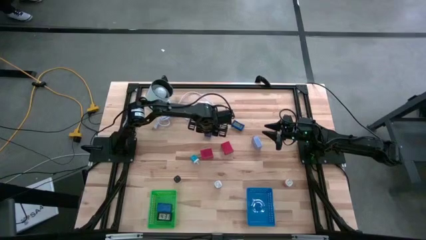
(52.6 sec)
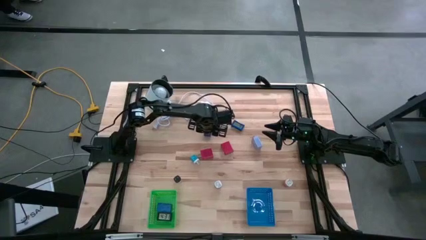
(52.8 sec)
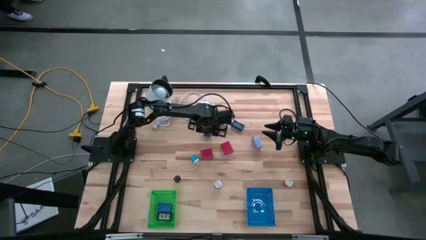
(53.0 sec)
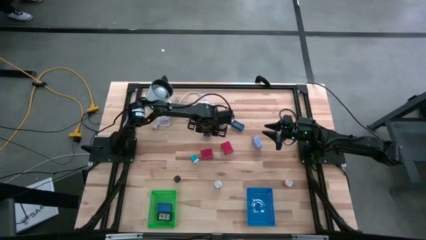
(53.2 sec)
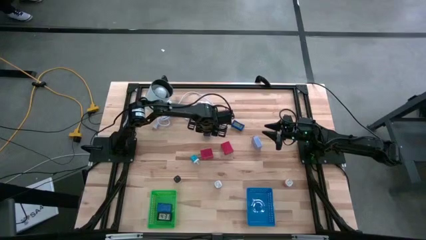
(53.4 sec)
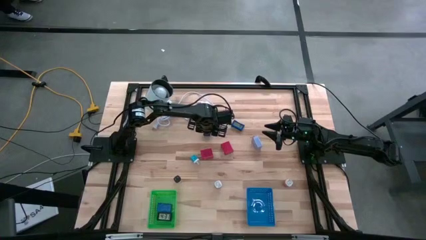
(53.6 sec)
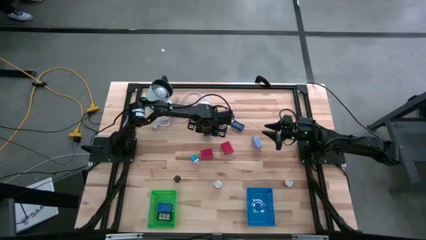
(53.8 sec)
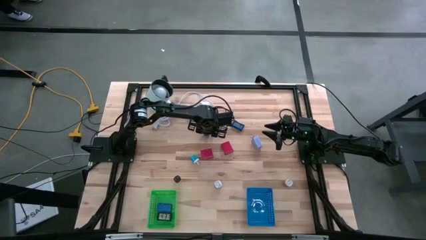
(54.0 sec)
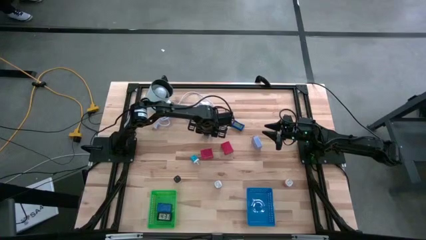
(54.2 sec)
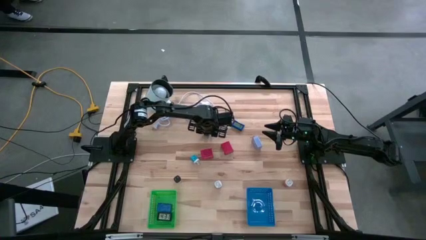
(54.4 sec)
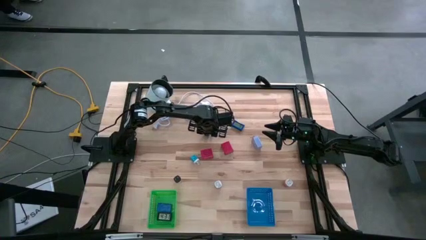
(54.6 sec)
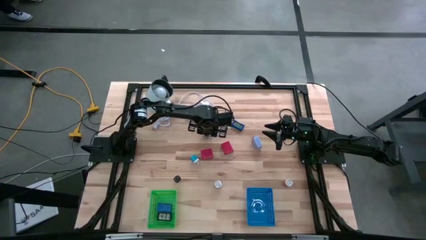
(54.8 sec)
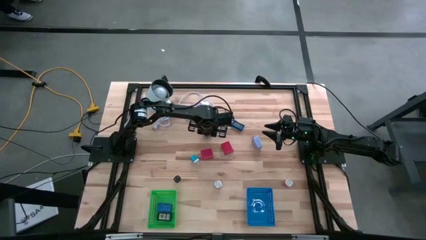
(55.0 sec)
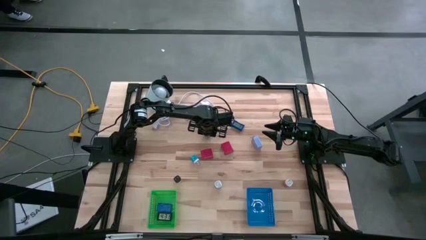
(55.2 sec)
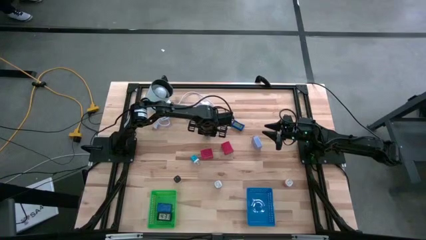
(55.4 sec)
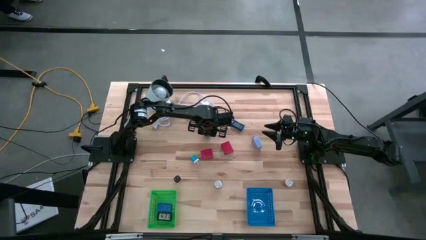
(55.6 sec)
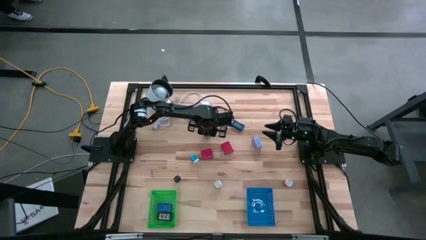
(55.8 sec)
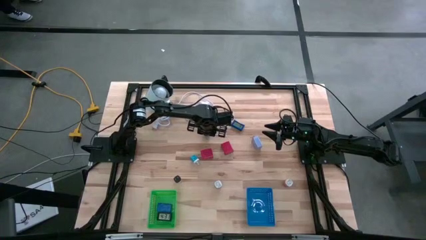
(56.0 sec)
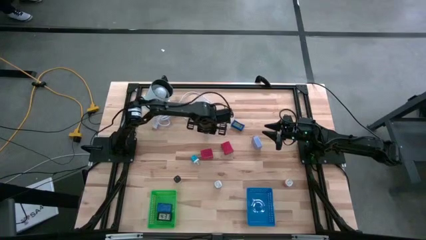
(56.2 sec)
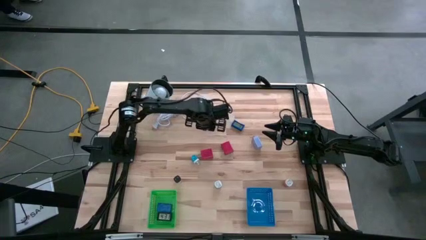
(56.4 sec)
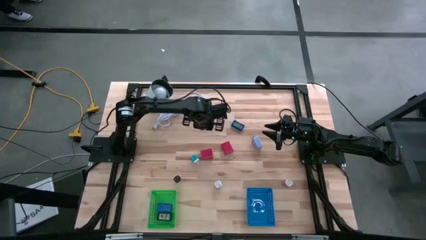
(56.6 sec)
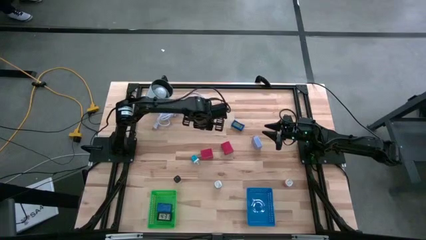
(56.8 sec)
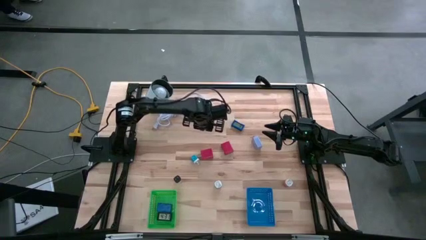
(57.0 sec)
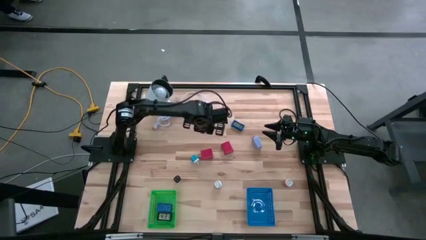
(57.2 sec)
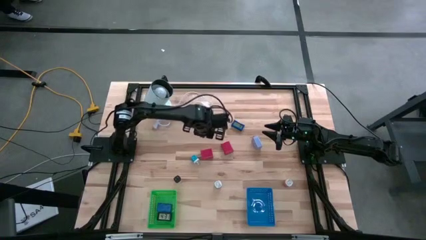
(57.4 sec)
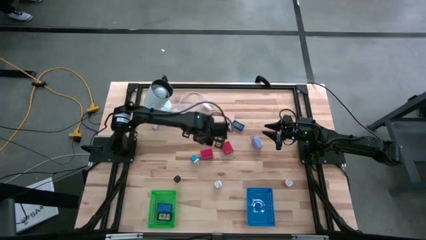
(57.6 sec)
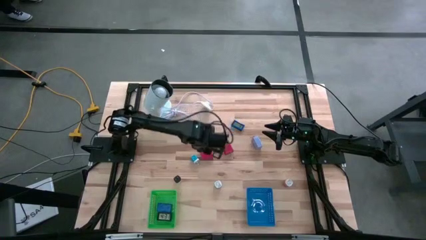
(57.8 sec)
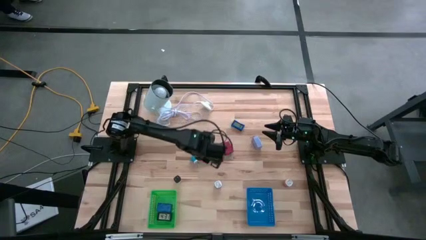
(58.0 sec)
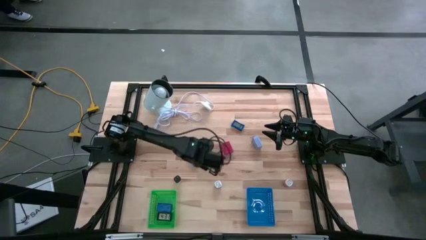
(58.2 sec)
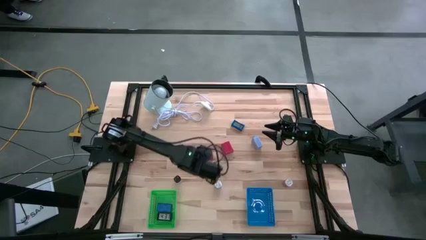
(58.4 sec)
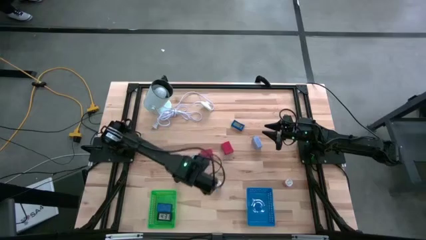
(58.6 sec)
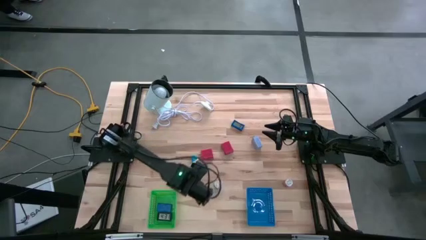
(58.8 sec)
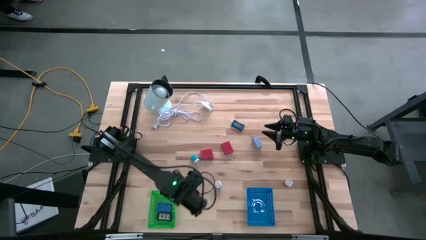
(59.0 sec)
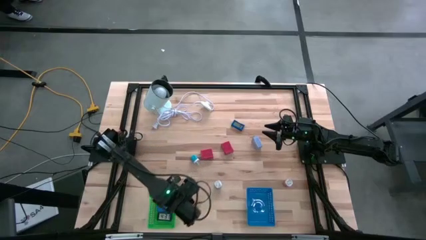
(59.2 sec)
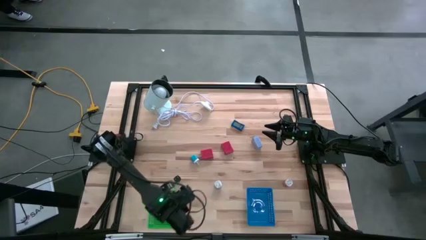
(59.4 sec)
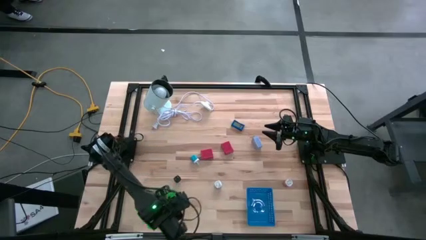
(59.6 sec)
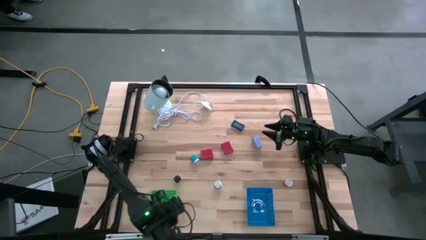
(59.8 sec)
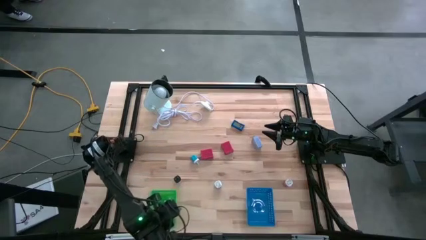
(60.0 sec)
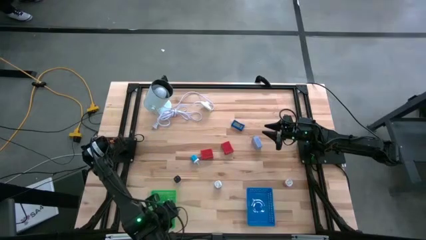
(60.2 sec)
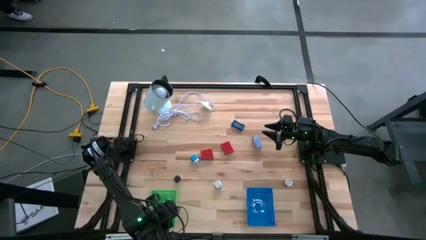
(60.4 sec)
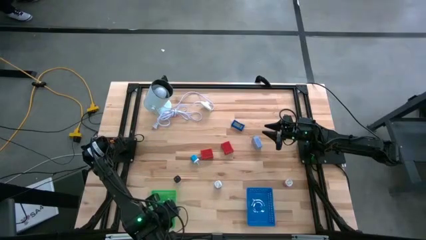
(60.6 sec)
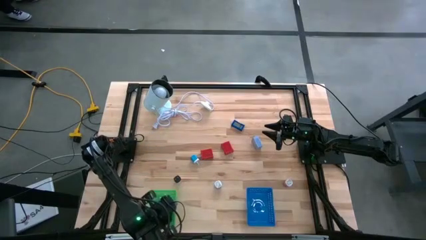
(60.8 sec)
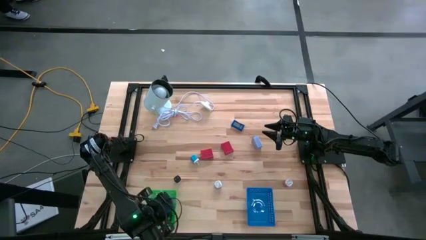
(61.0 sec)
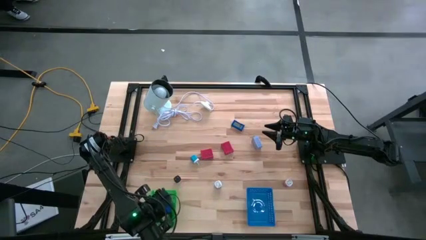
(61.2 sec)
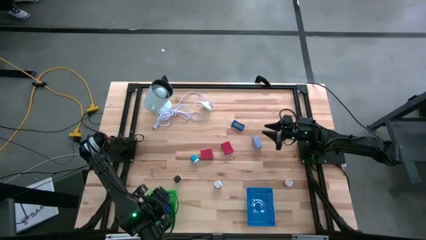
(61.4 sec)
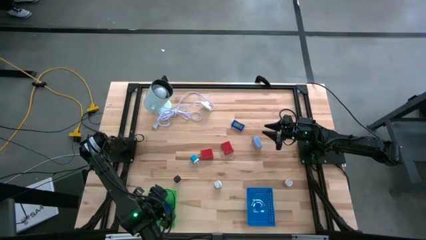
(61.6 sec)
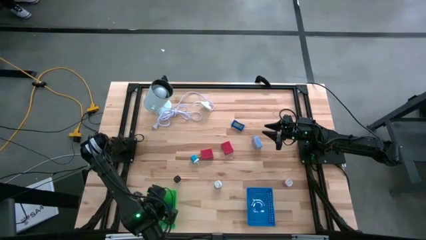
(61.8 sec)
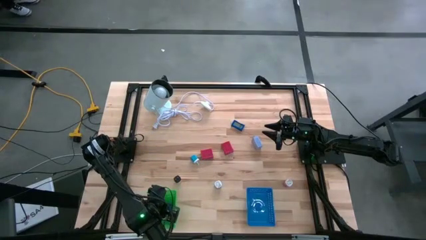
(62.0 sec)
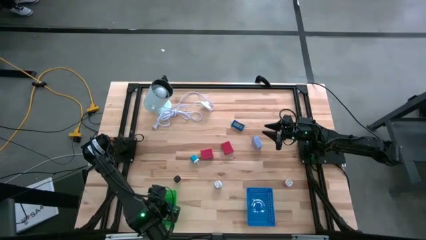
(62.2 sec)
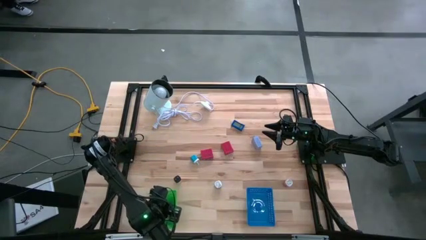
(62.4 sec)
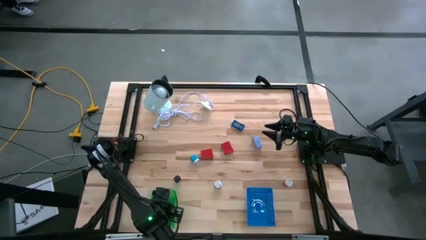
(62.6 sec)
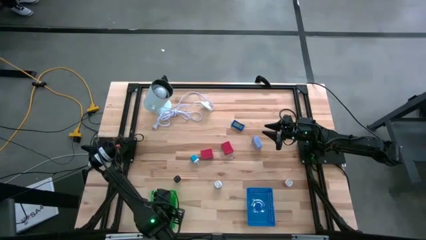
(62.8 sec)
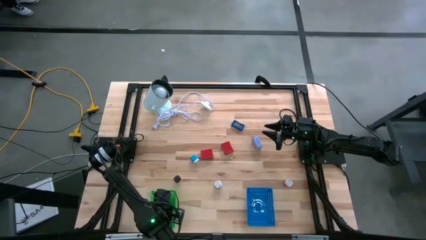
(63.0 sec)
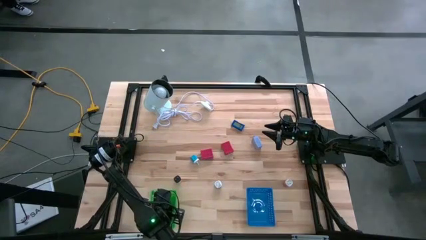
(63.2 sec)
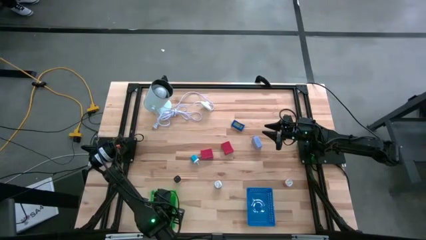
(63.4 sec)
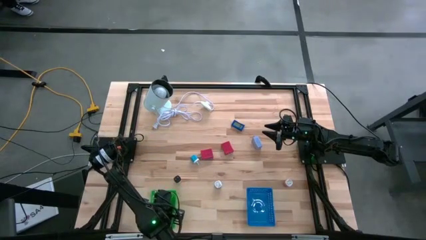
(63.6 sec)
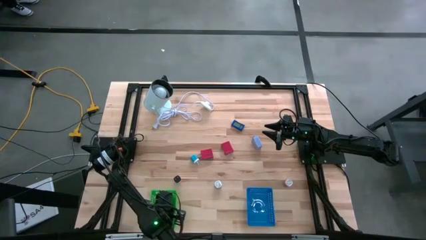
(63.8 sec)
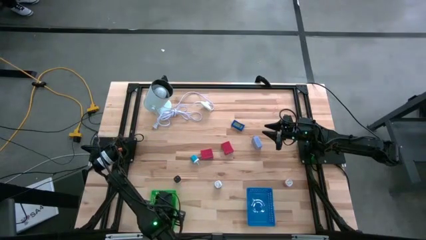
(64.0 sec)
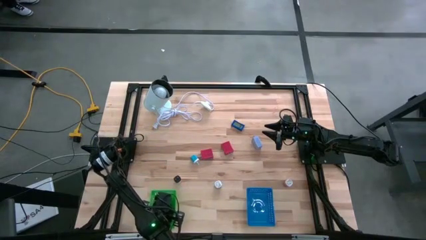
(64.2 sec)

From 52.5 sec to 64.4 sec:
Task: Pick & Place Office items
Put the left blue digital clock into the green bin

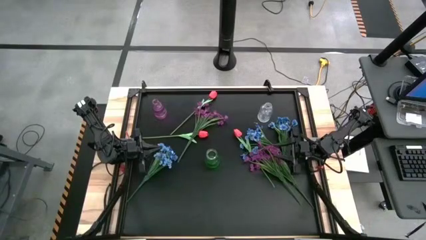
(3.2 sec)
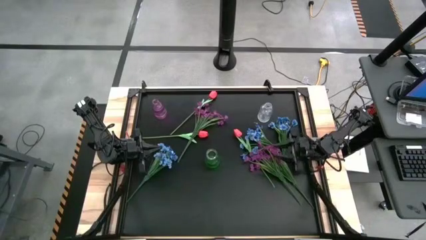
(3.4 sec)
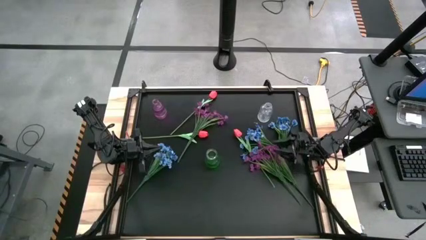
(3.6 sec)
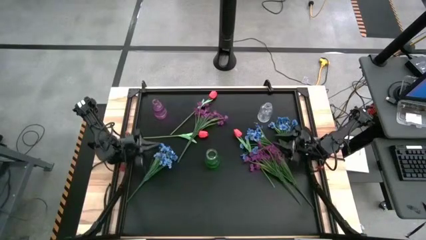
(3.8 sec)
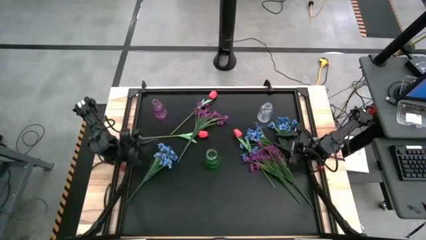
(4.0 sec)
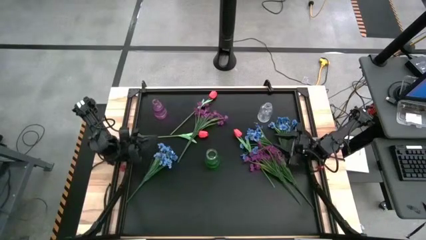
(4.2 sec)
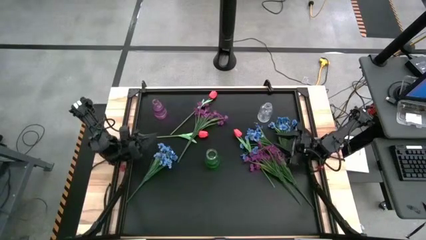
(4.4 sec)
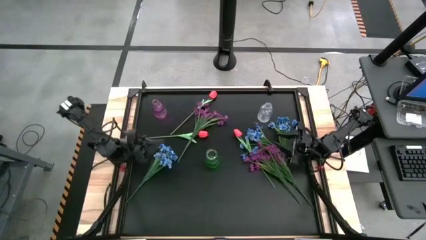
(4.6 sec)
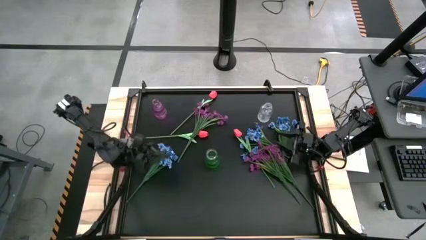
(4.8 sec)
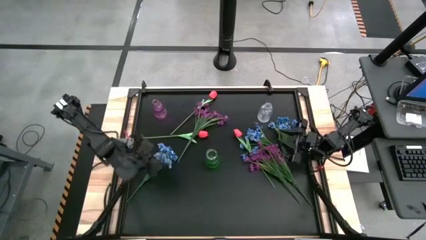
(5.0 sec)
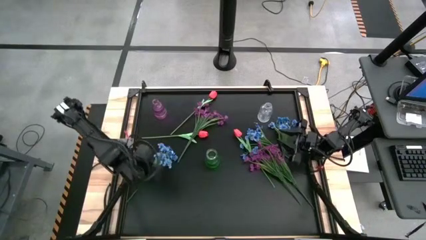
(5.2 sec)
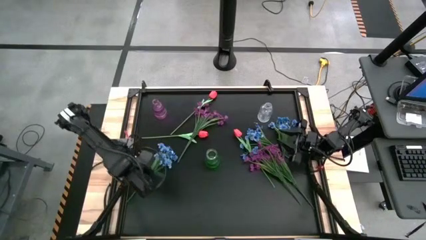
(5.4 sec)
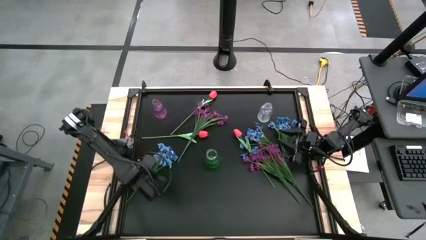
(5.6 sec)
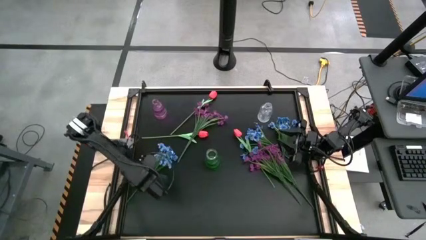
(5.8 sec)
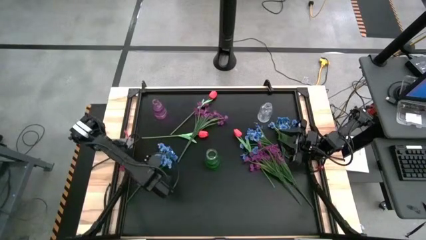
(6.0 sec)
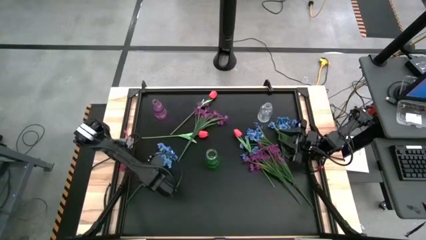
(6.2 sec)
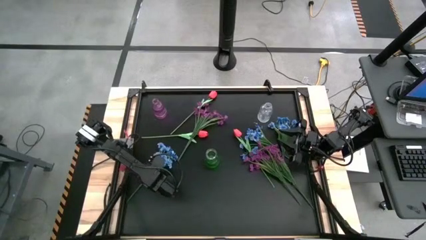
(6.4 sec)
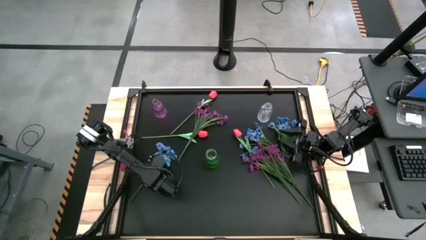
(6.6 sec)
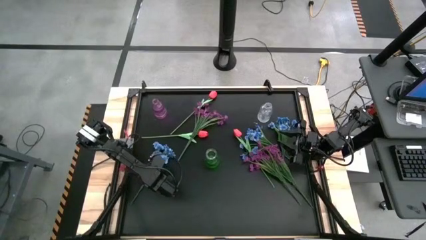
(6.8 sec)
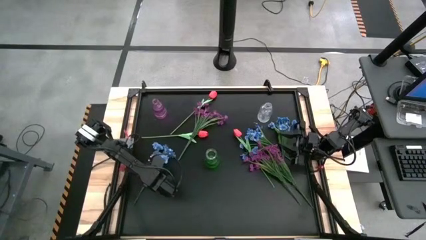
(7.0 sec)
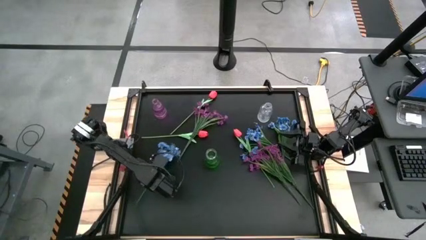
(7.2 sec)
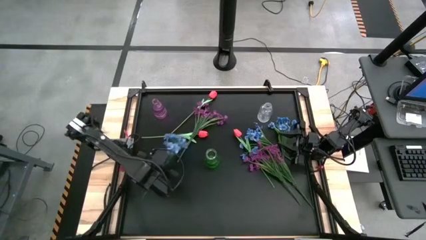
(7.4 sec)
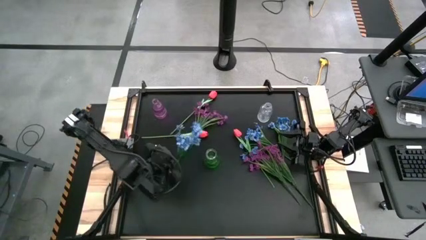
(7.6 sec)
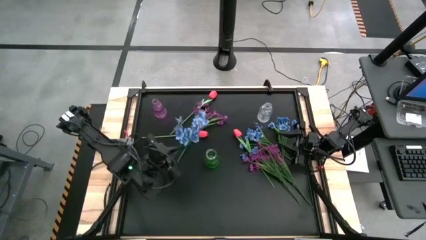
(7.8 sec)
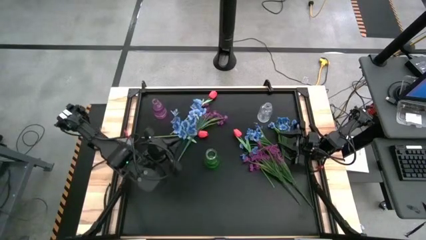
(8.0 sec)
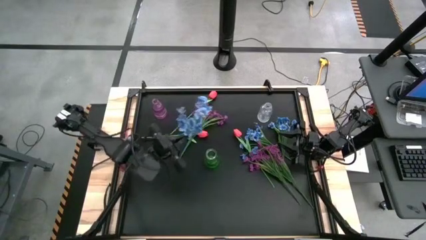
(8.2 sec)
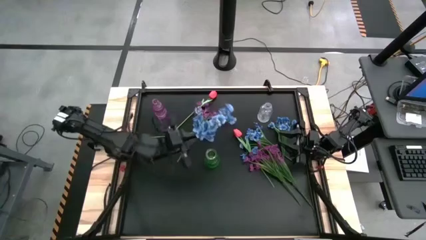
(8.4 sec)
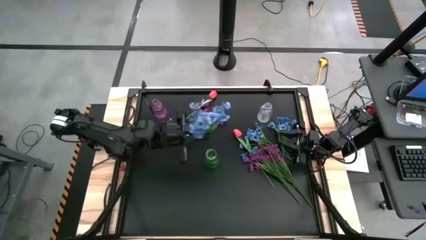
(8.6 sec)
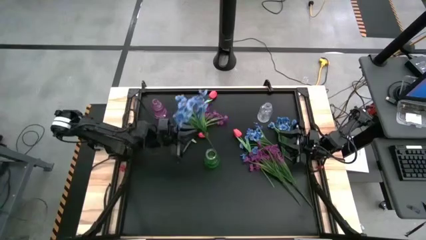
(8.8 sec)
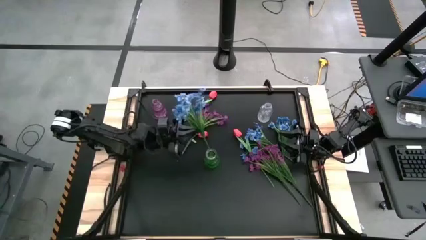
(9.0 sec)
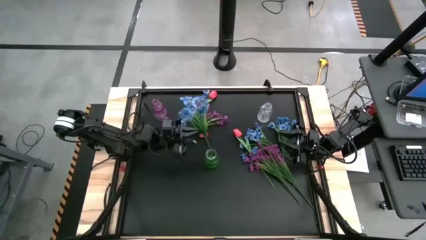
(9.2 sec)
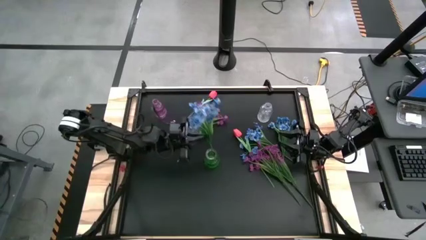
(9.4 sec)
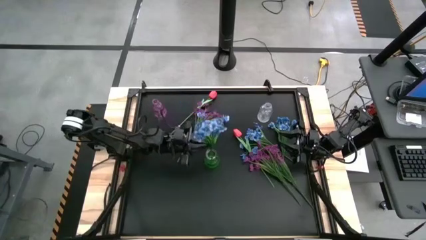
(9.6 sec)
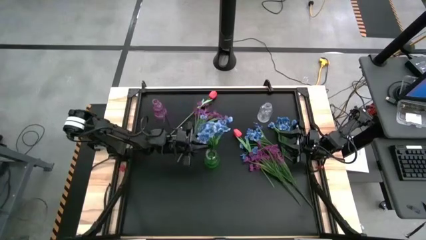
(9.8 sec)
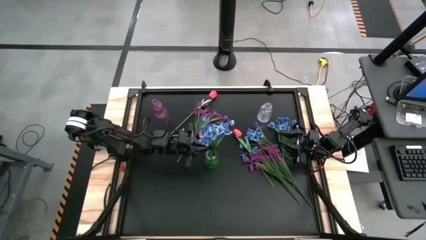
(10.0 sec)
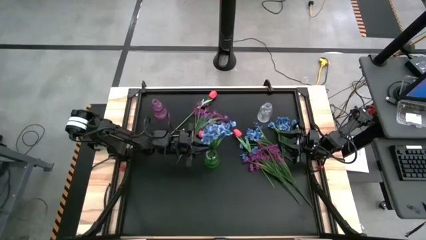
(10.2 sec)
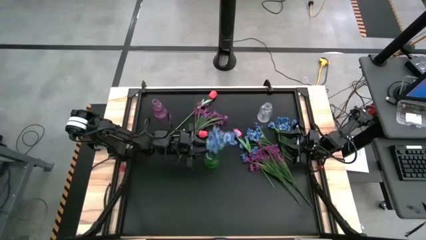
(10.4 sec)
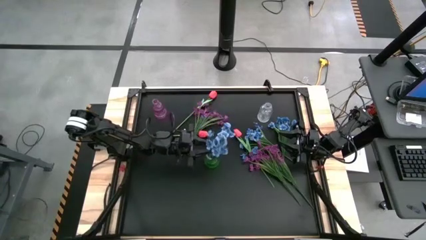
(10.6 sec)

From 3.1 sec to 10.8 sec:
Task: Sort flowers into vase by color
Put the bottom left blue flower into the green crystal vase
